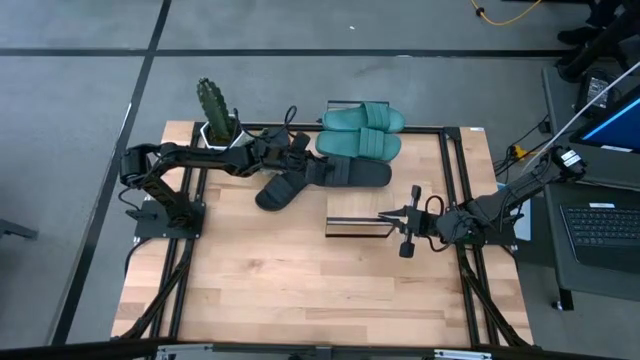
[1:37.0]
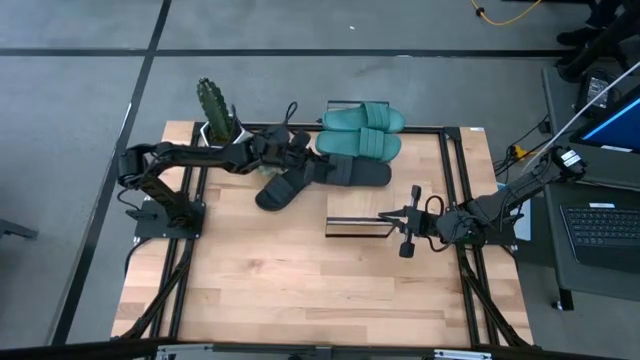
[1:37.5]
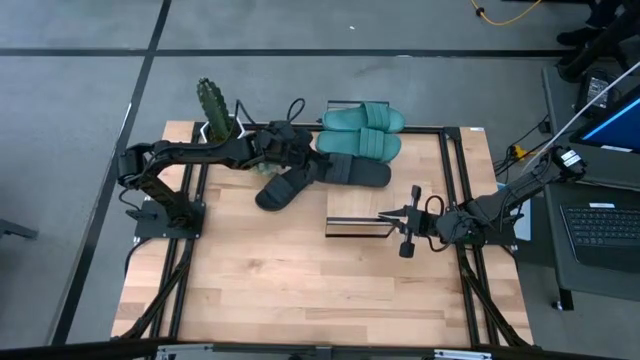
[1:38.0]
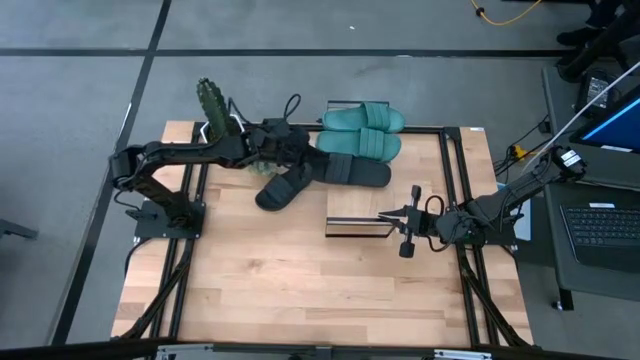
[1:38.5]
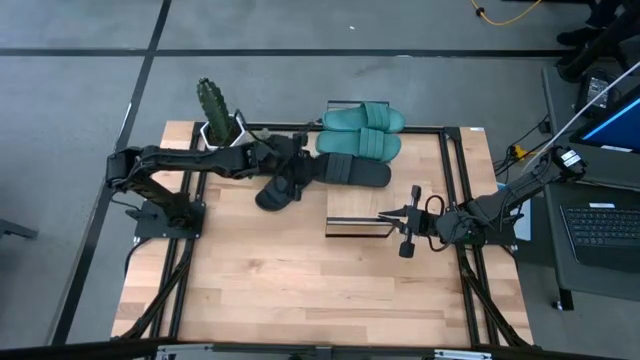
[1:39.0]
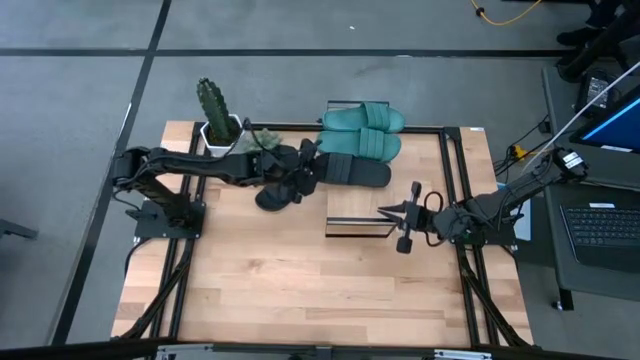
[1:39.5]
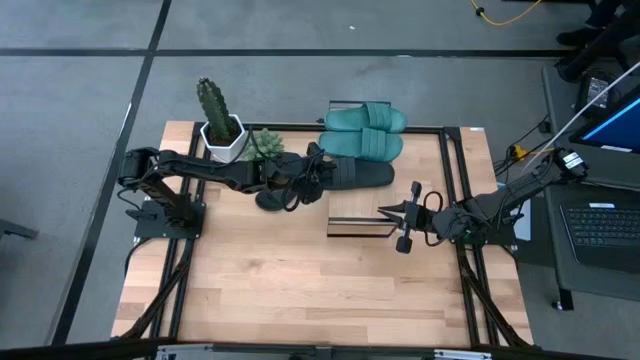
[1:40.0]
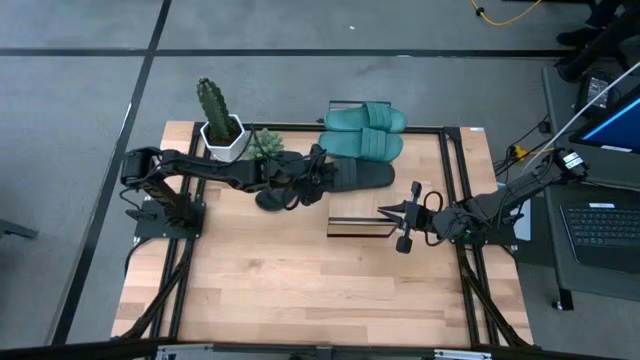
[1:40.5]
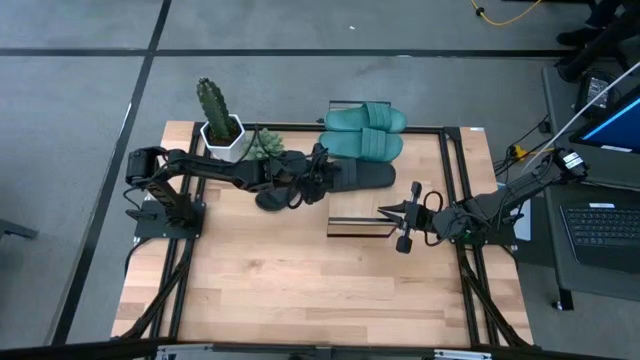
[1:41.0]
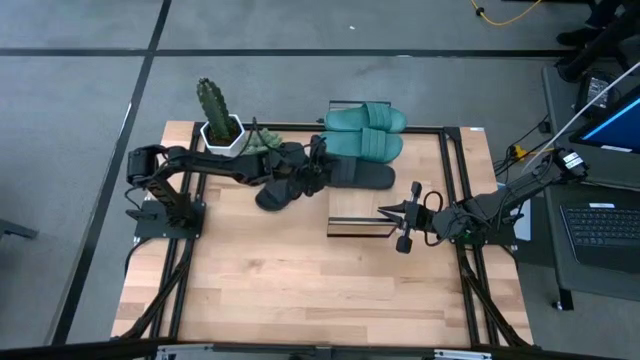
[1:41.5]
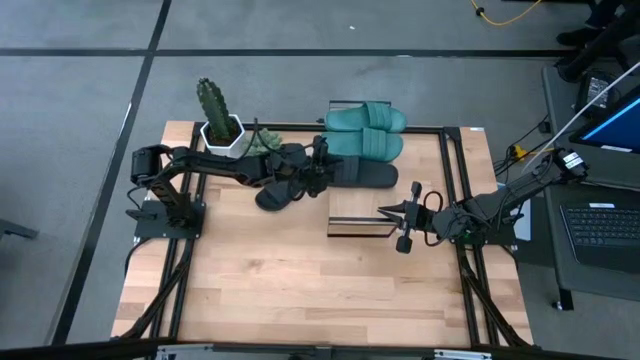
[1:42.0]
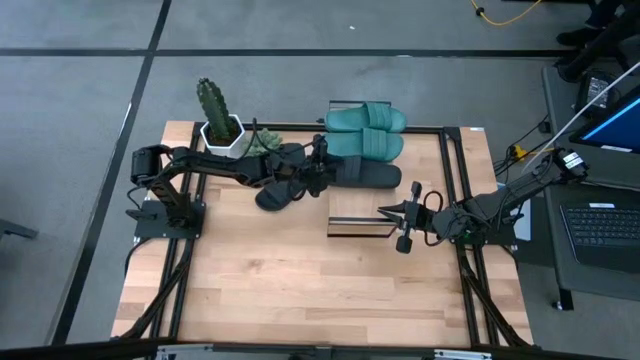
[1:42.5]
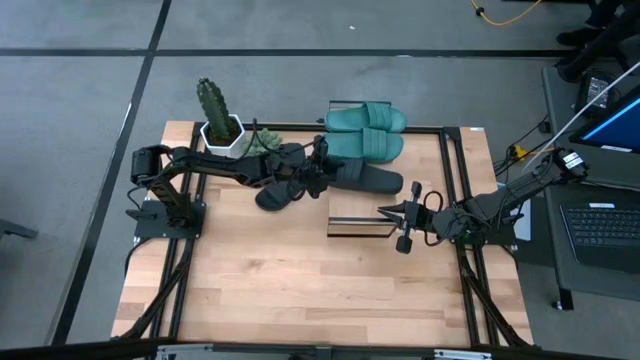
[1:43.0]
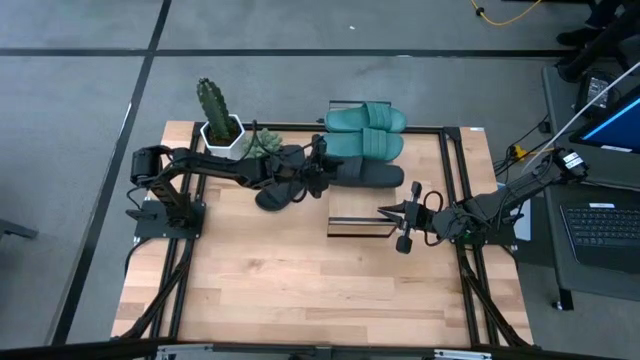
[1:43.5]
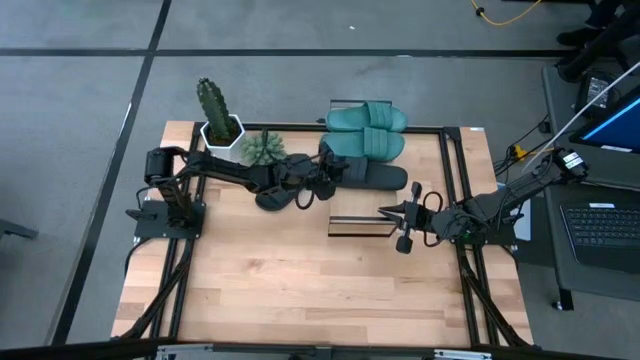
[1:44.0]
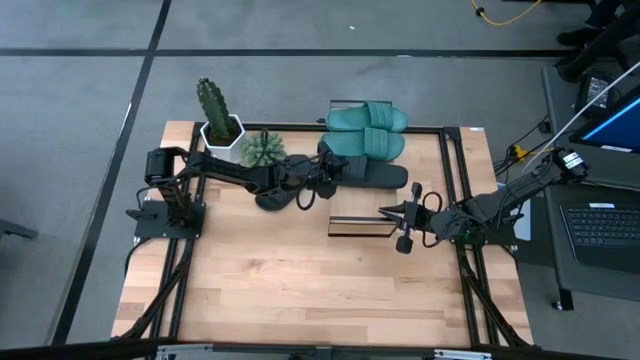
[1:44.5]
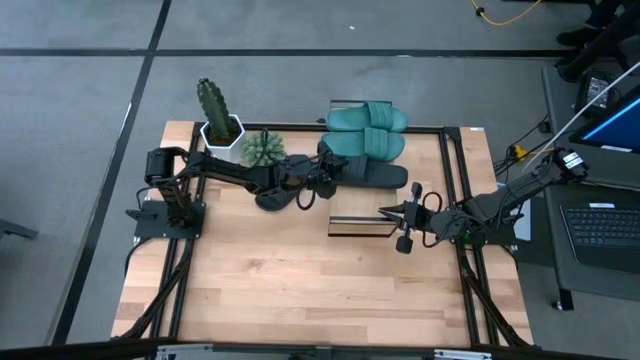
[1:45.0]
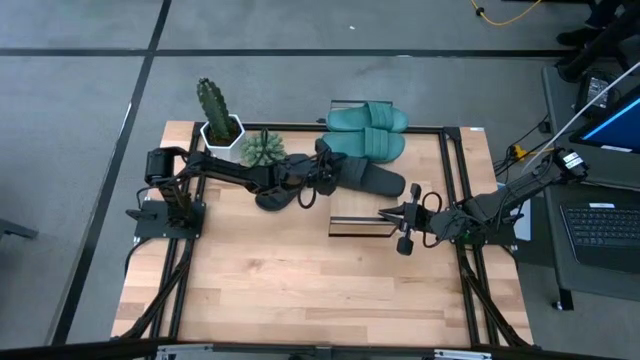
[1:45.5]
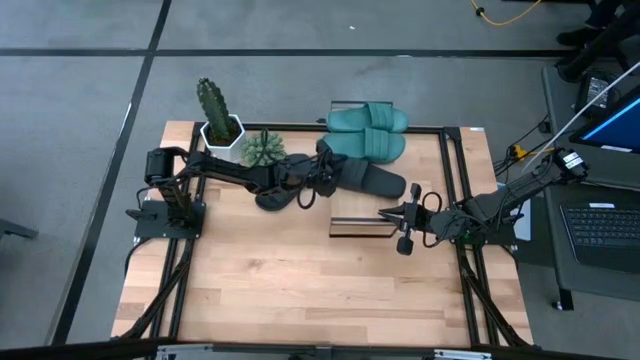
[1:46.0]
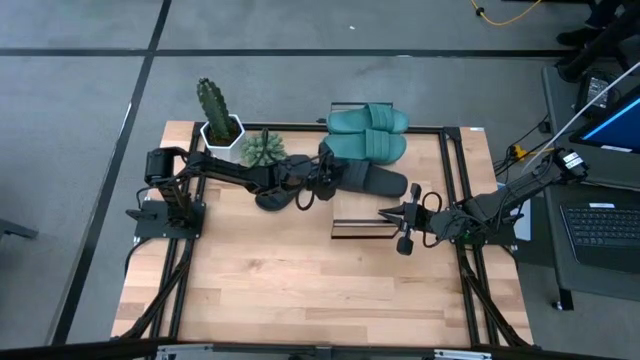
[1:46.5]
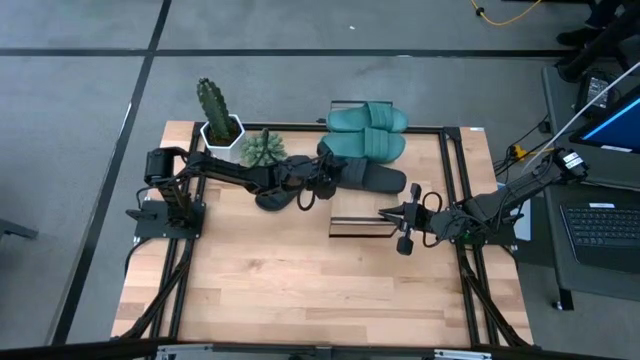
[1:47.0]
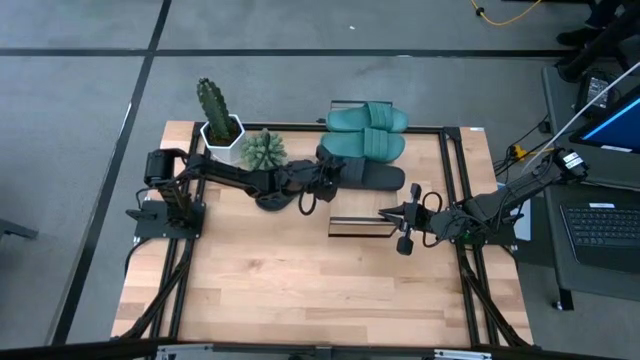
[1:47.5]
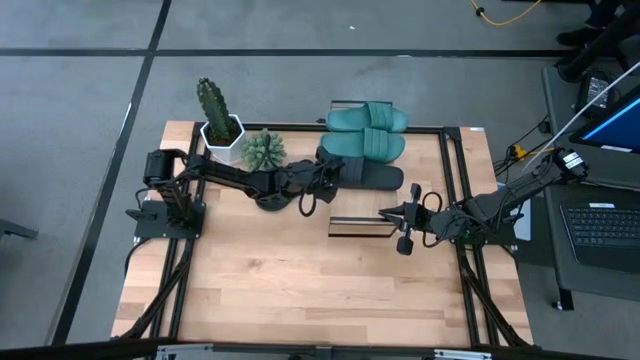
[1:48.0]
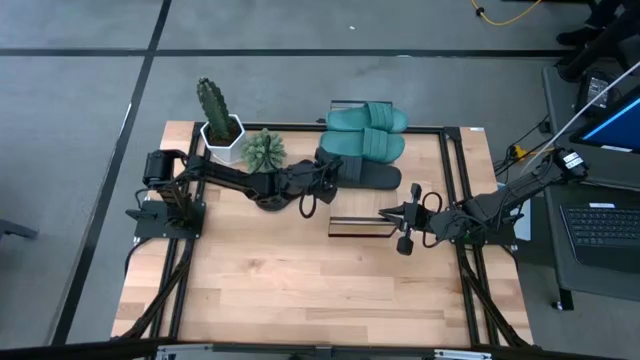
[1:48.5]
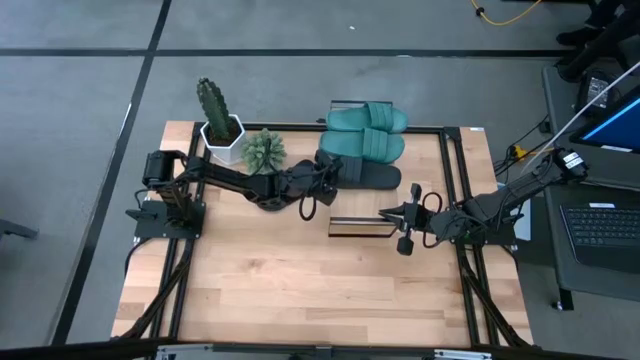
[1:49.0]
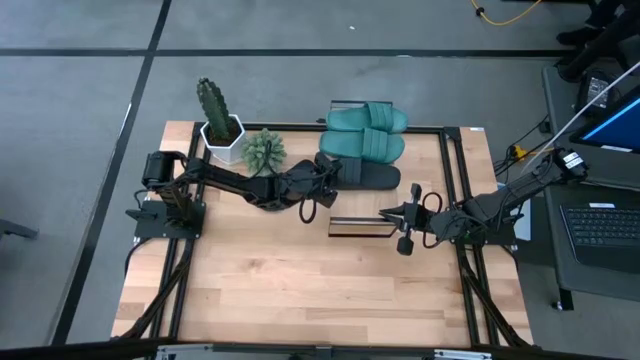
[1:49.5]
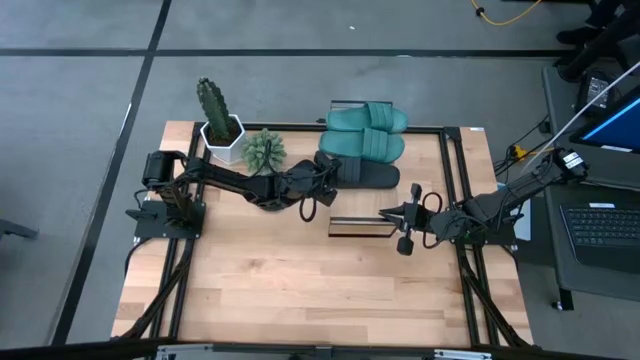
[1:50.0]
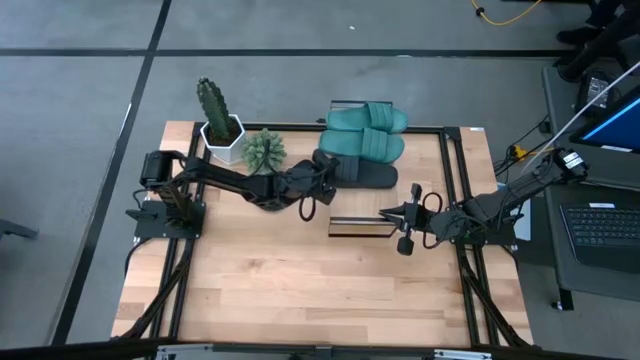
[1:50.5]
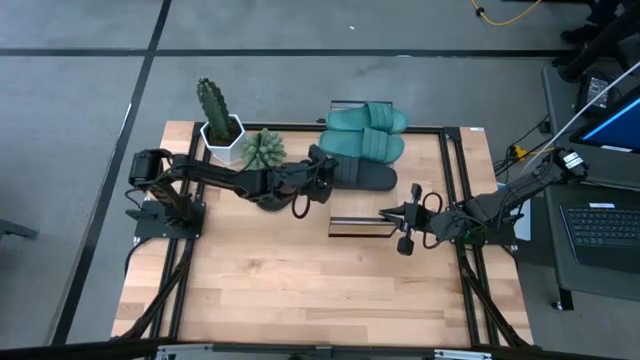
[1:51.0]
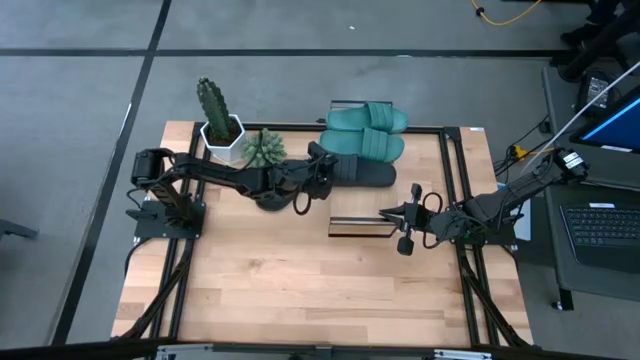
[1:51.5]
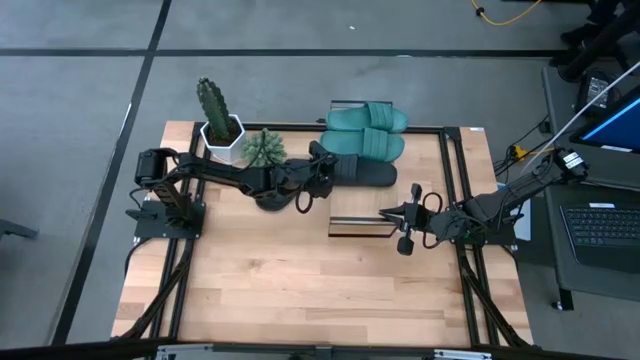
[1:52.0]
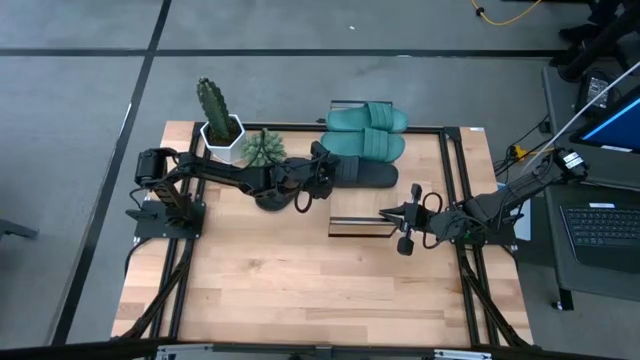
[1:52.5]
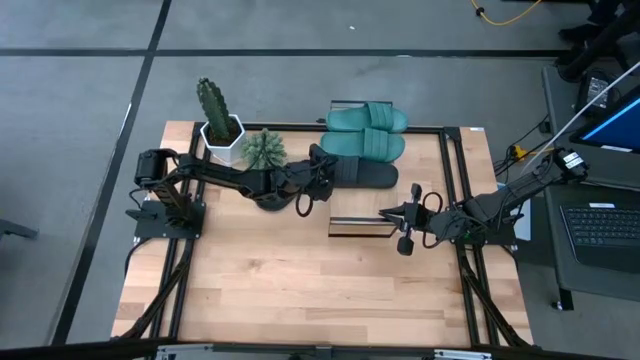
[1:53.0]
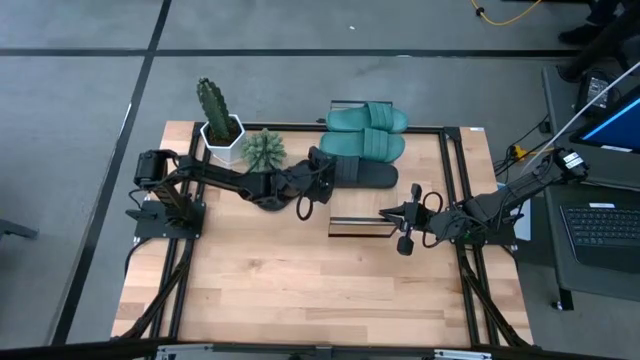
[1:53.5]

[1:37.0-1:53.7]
Task: Pick and place slides into the shelf
Put the bottom black slide on the shelf

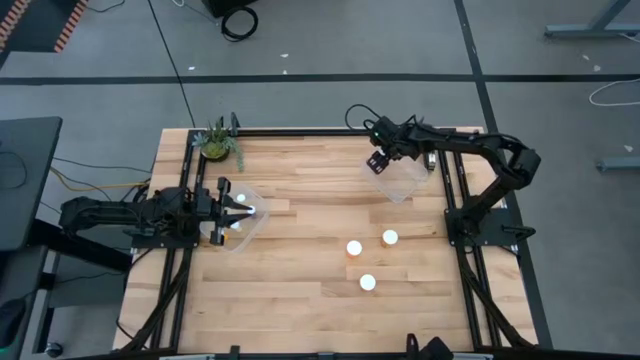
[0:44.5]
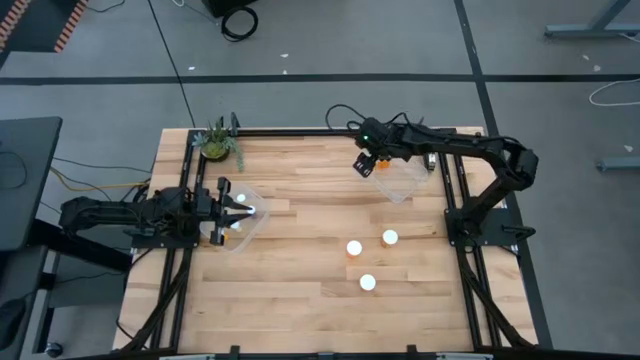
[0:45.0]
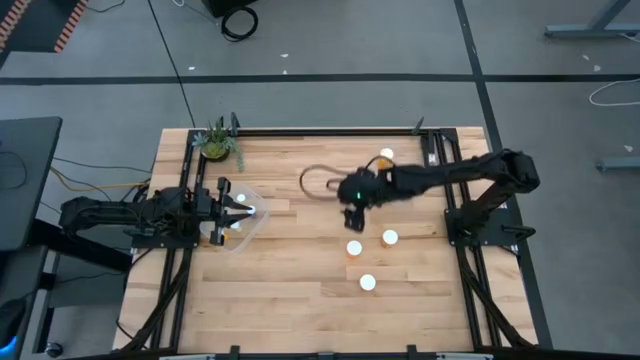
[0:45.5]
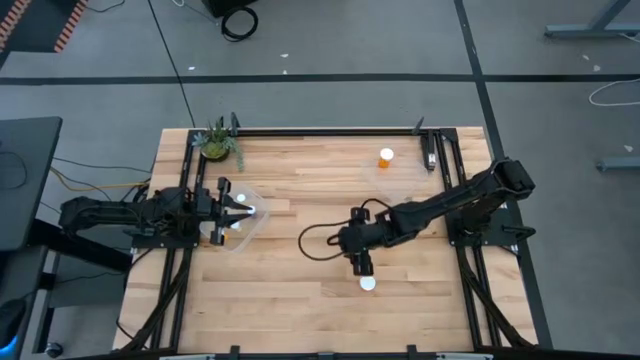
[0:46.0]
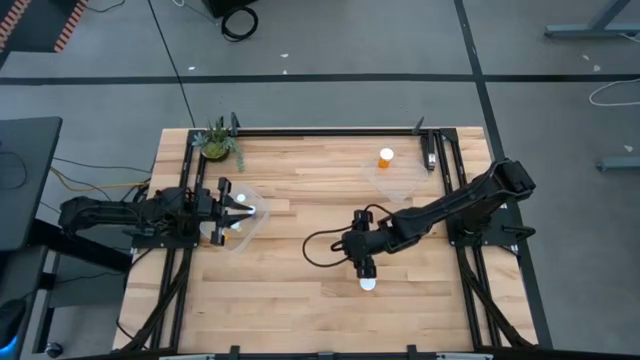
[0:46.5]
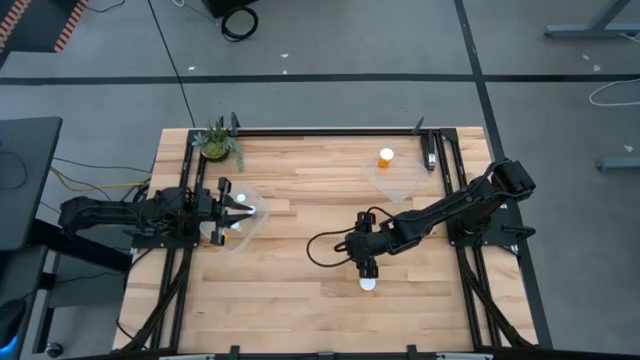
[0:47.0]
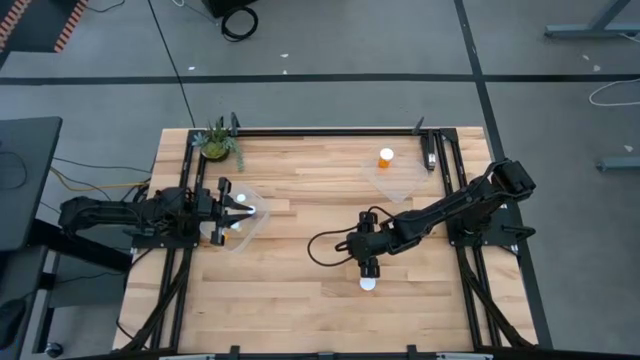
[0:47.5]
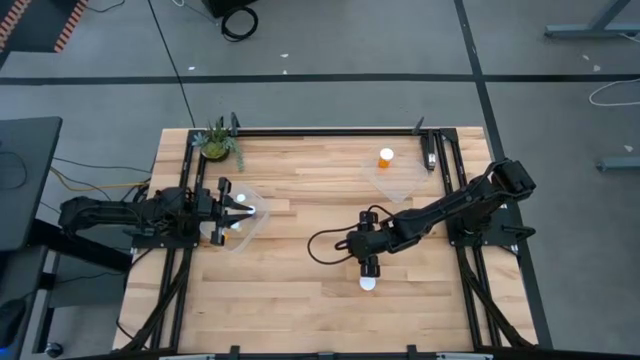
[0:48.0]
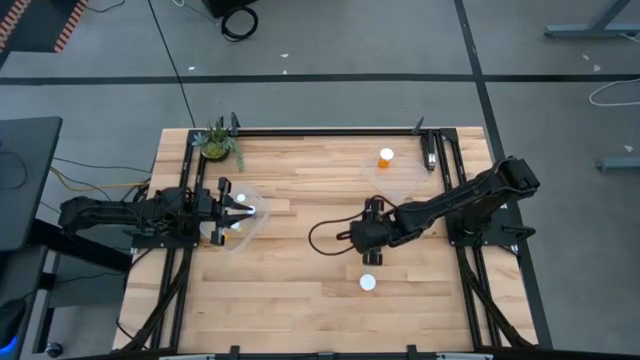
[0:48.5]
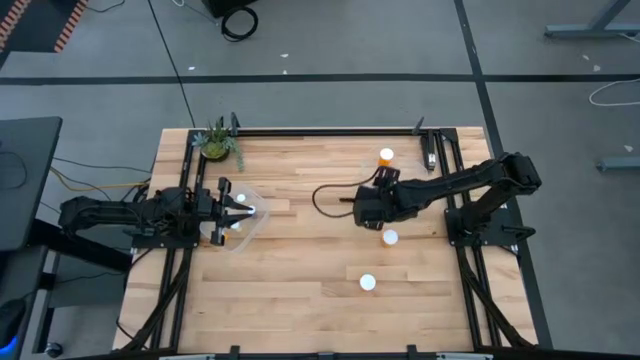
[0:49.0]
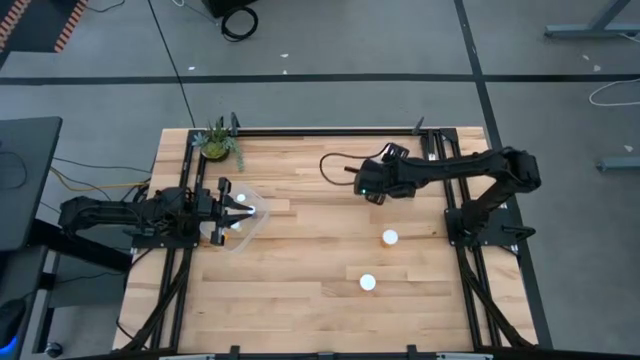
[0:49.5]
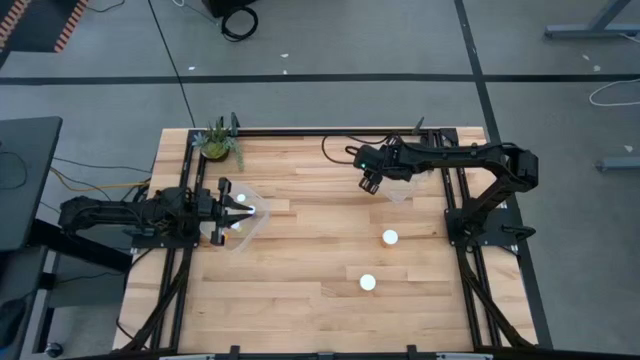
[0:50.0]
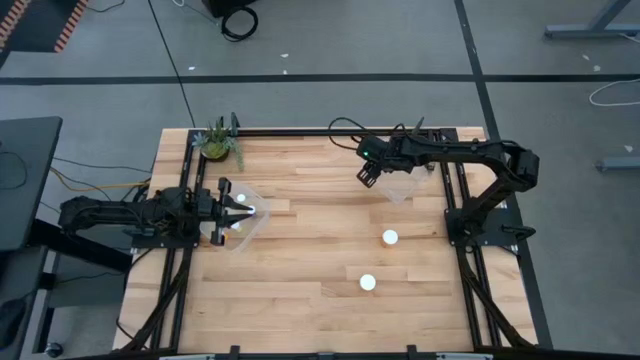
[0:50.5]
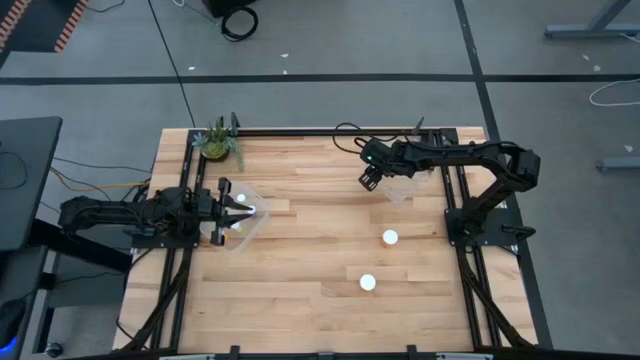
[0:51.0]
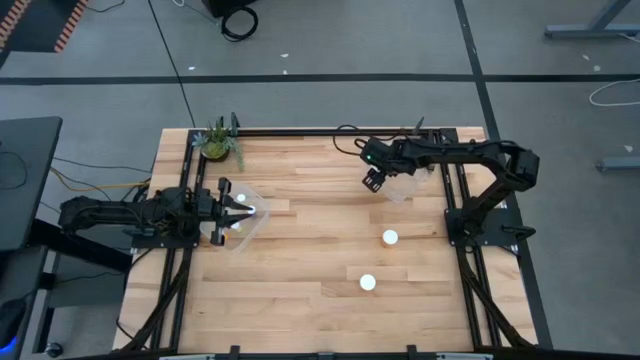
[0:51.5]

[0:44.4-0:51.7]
Task: Pick and place medicine bottles into bin by pill shape (circle, oval)
Put the large orange pill bottle into the right transparent bin
